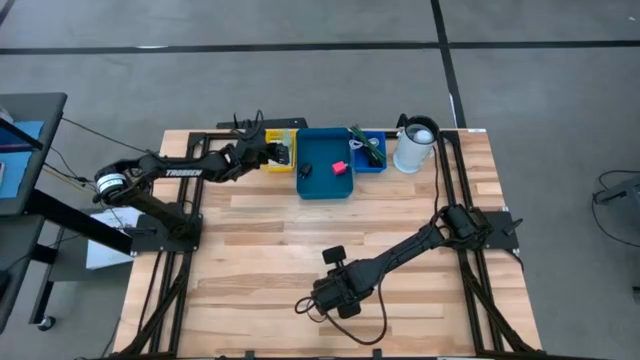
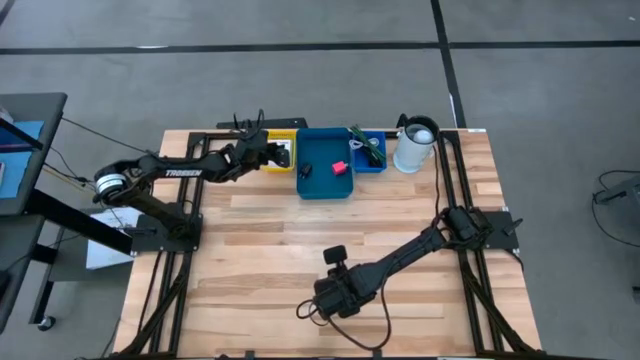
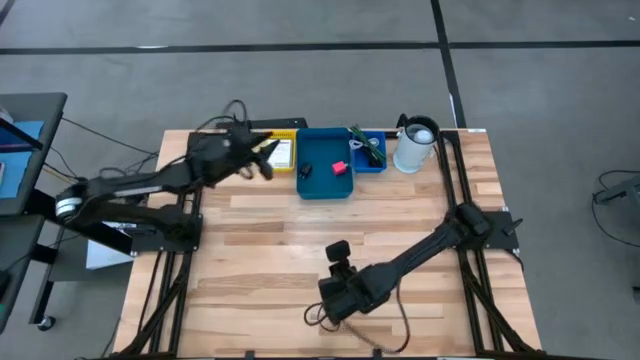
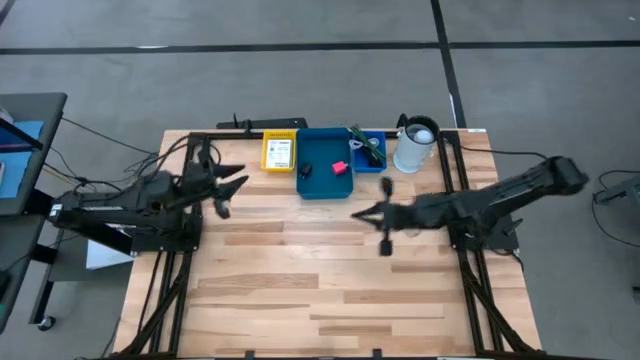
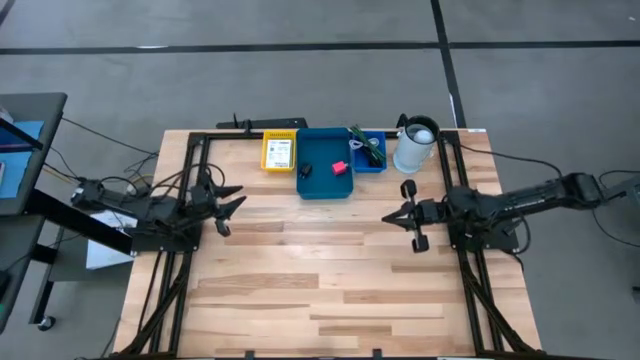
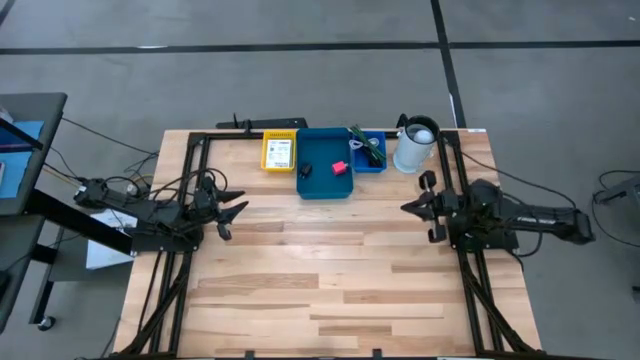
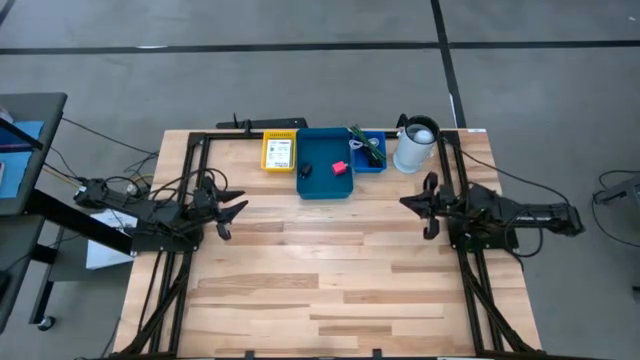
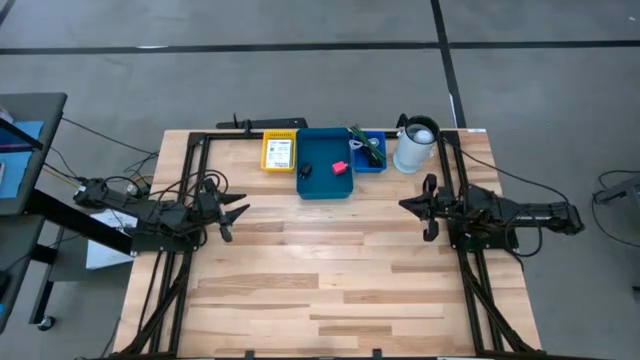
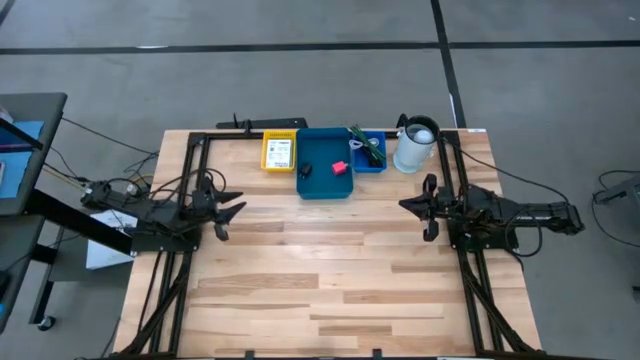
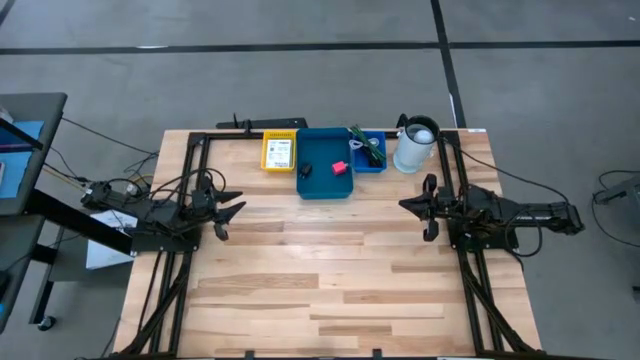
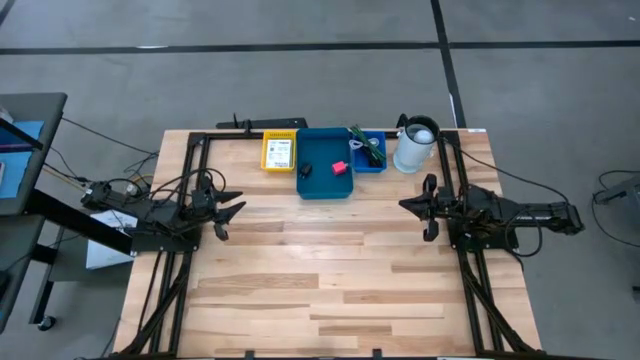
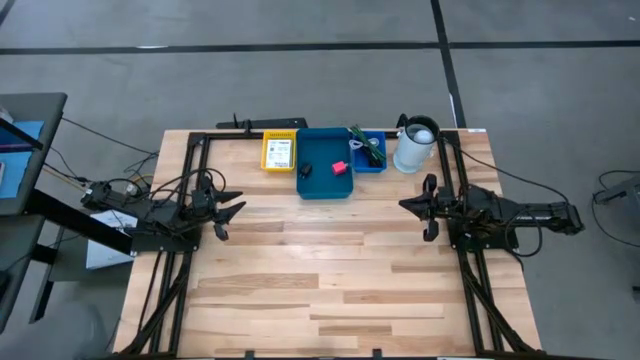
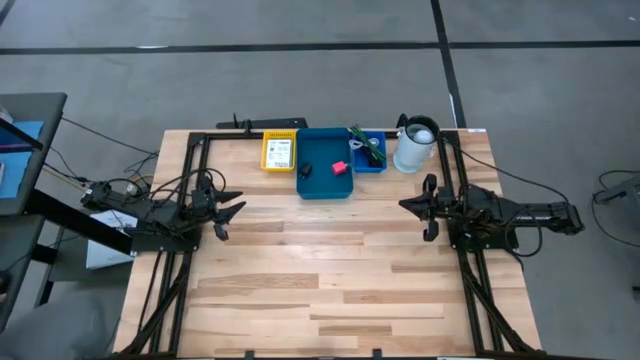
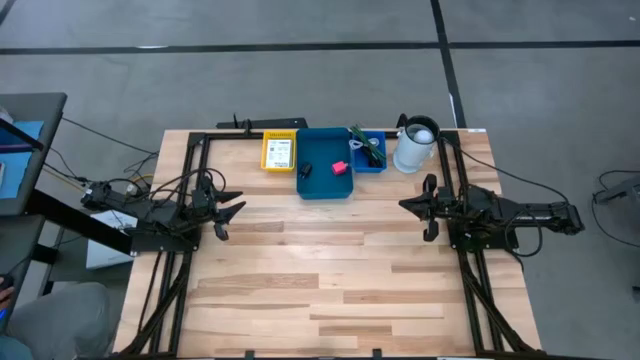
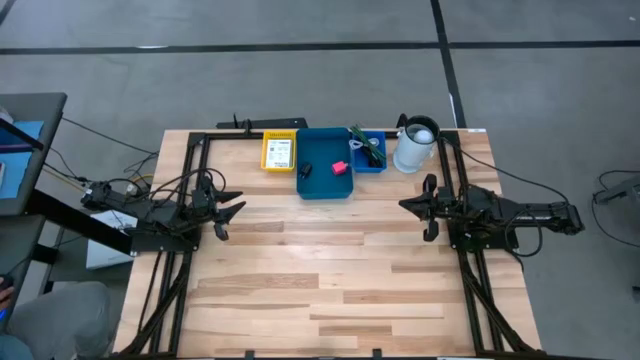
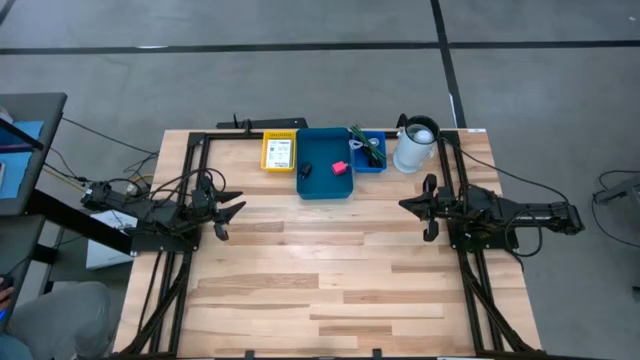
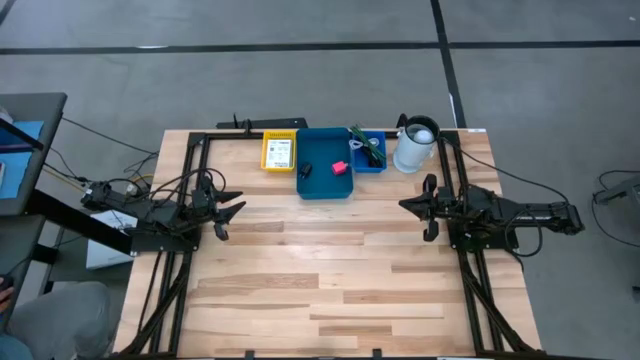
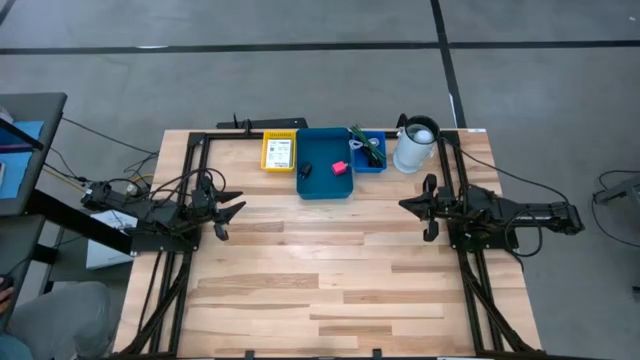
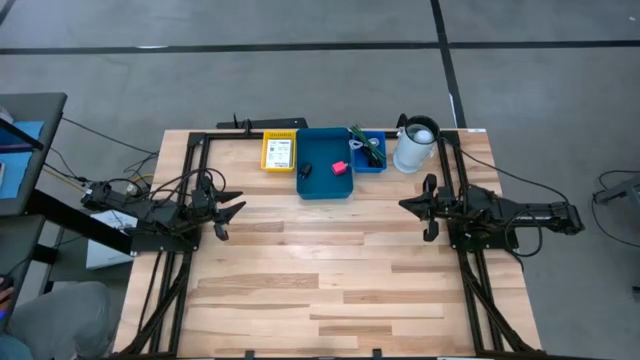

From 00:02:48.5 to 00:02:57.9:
Task: Pick and place items into bin
Return to Home Position

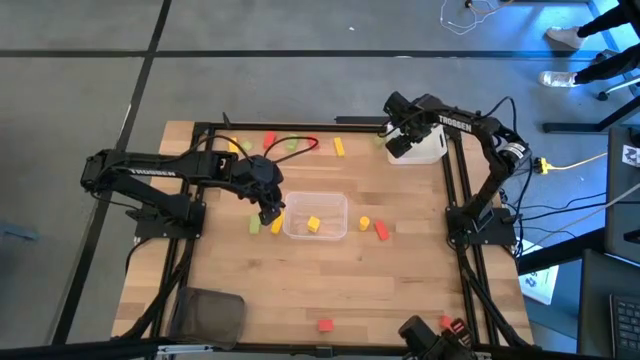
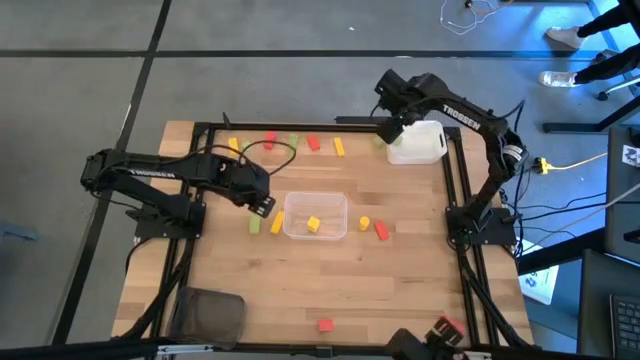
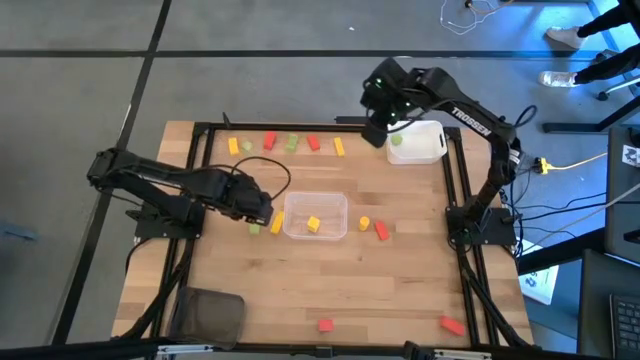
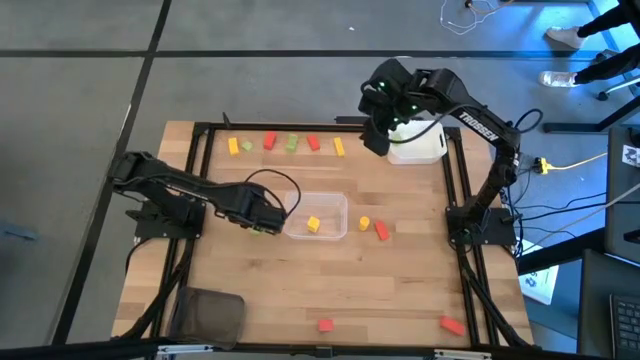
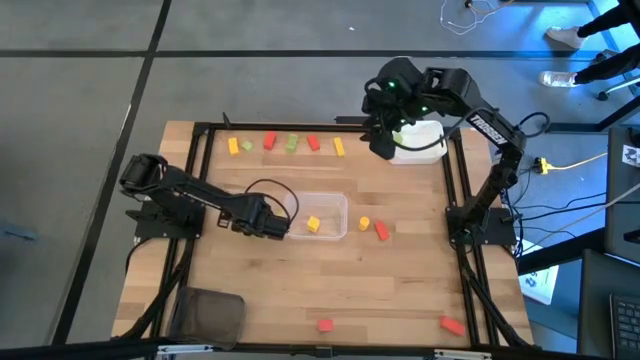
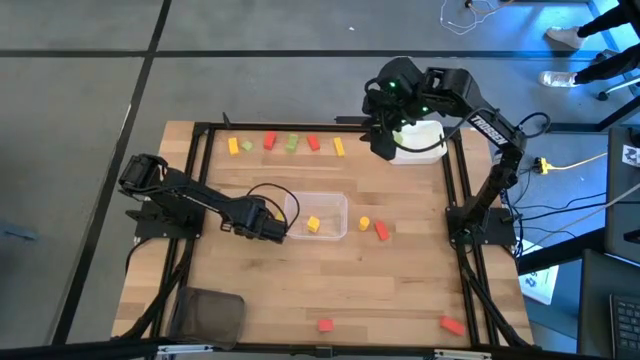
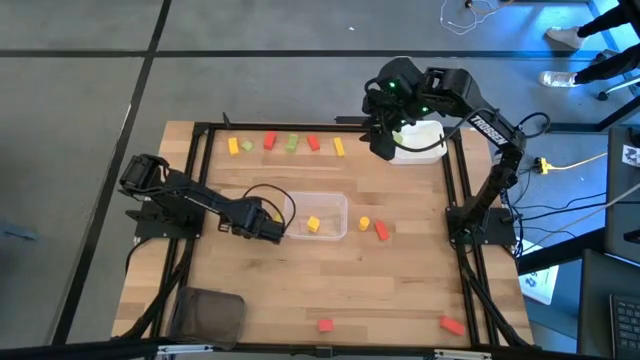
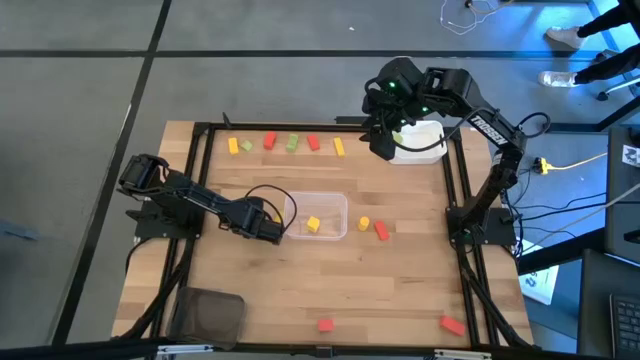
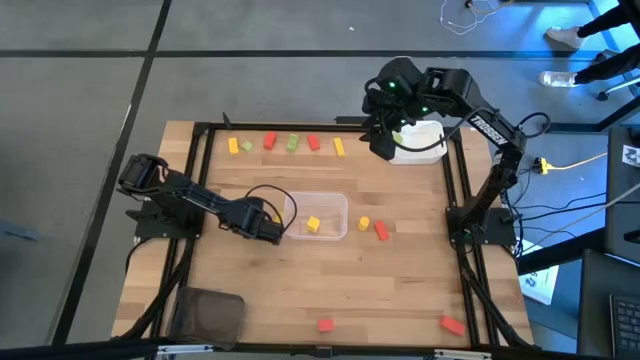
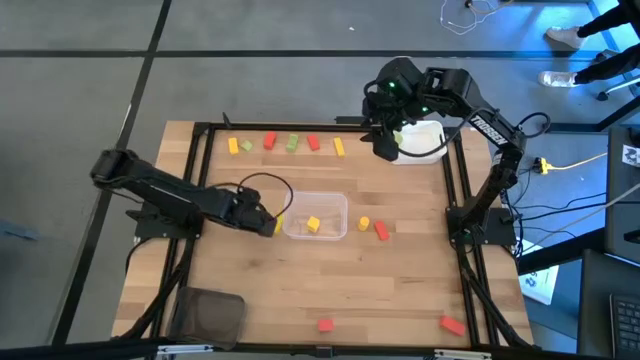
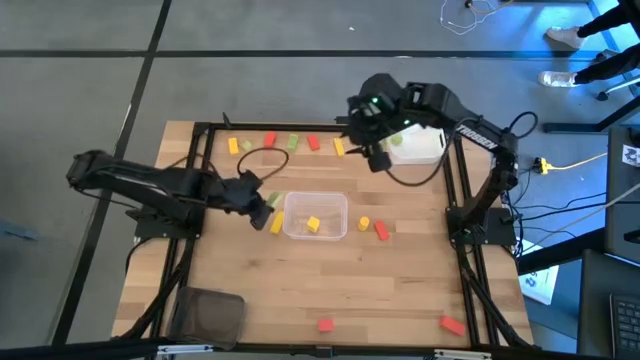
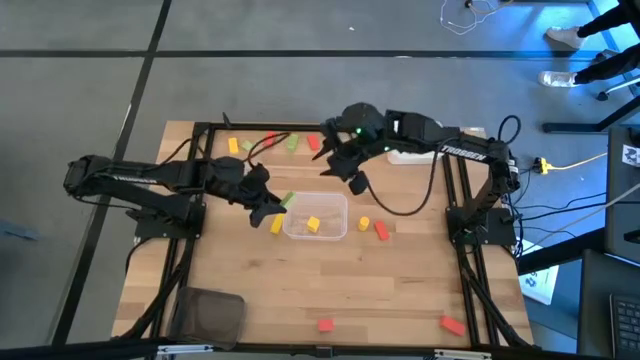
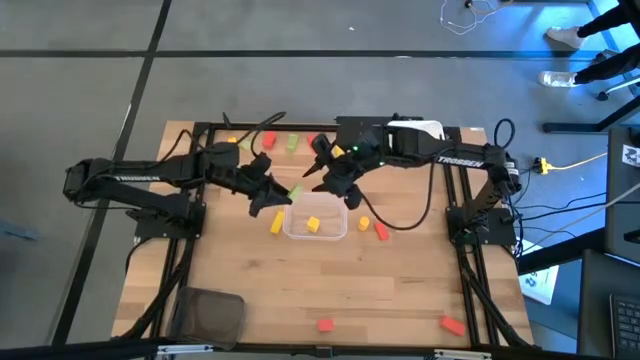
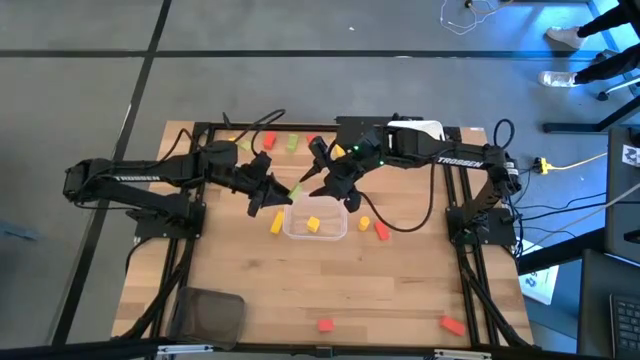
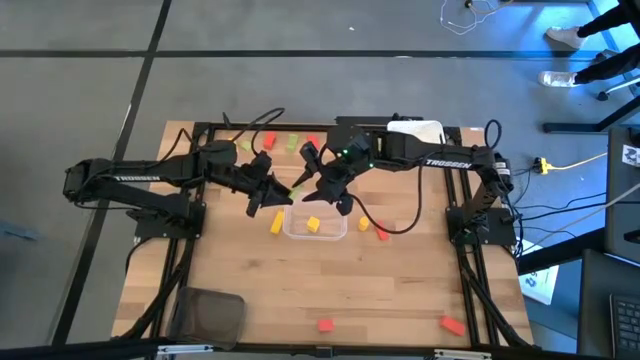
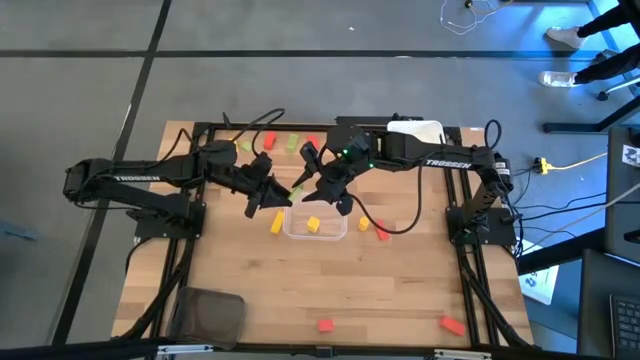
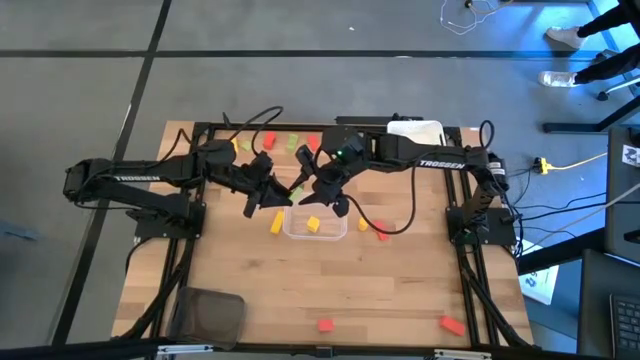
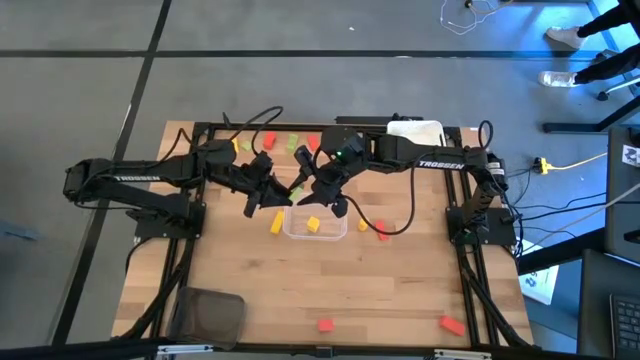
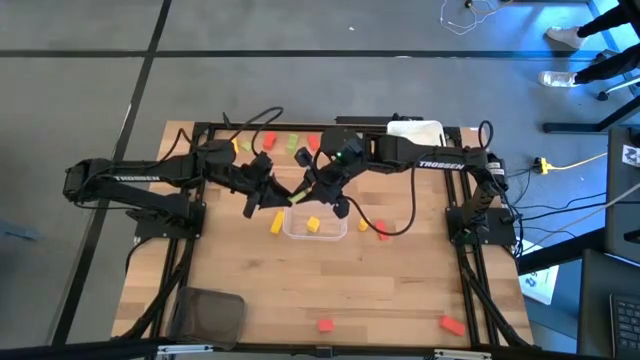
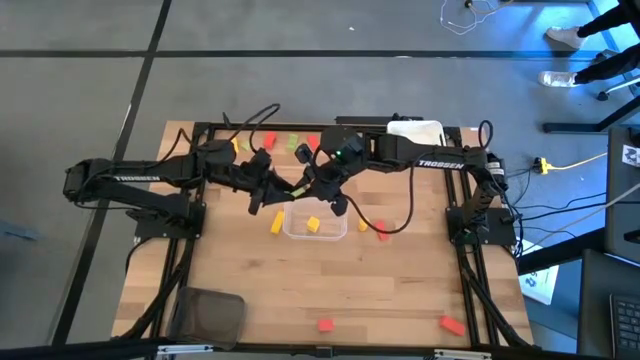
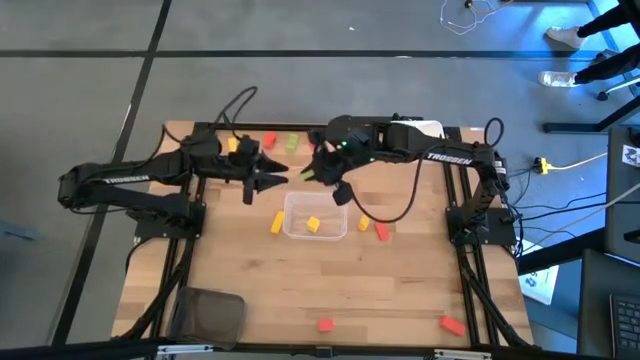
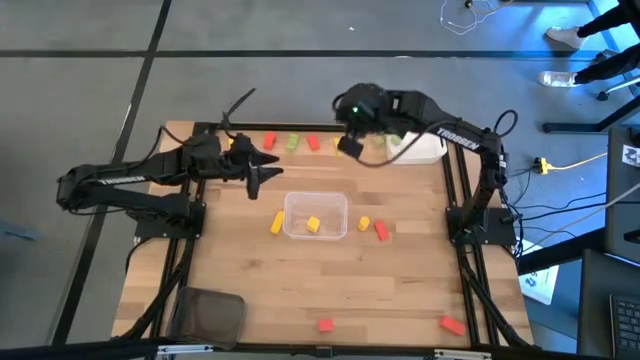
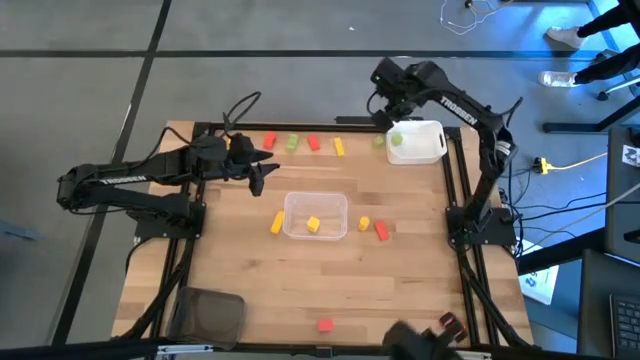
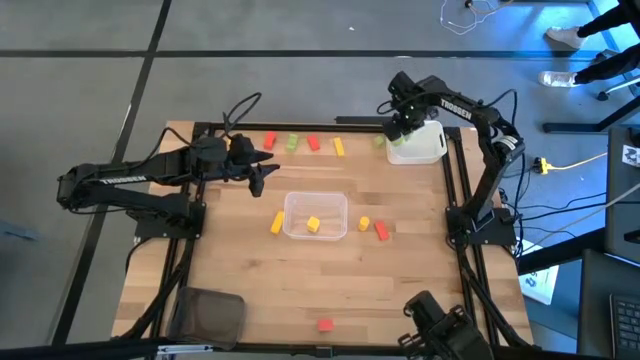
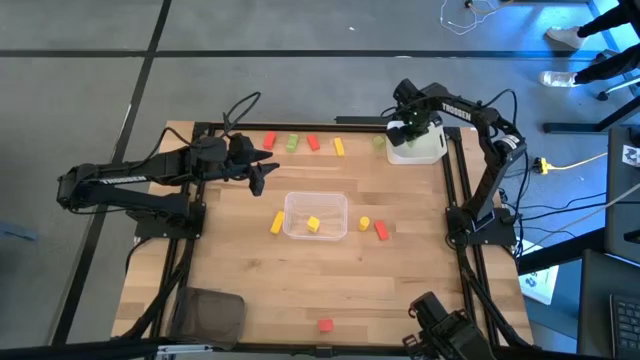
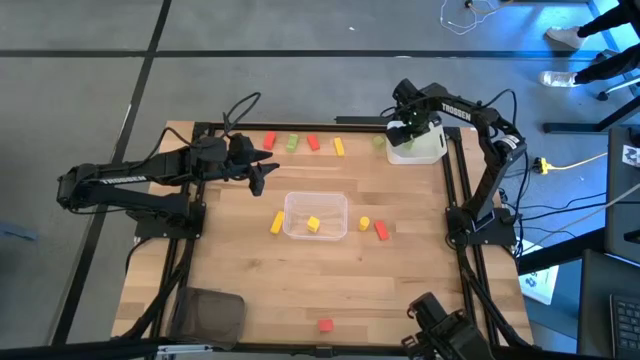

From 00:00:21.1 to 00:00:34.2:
Task: Sort & place blocks by color
Put the green block into the white bin
